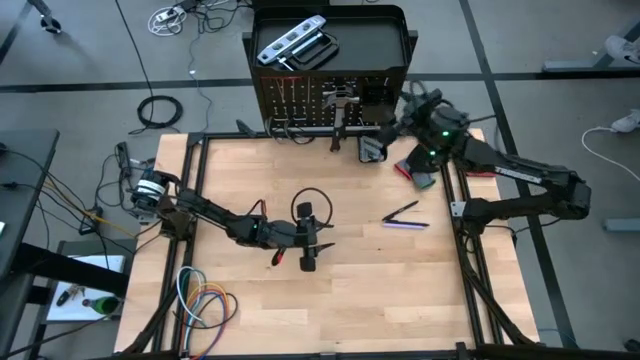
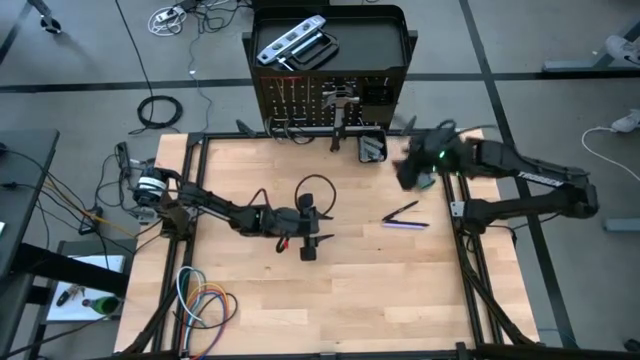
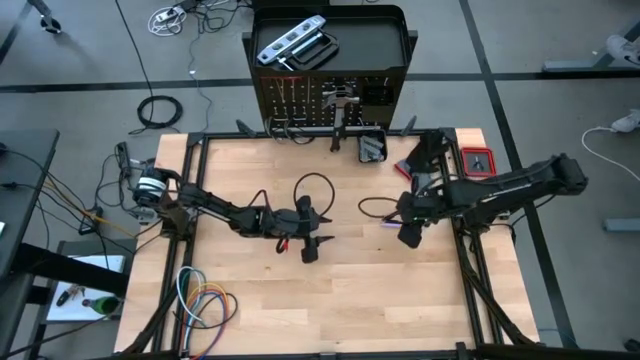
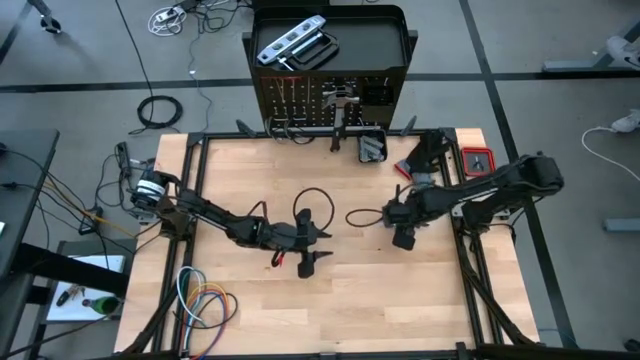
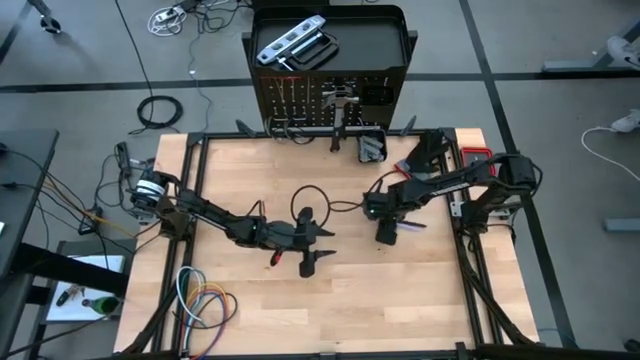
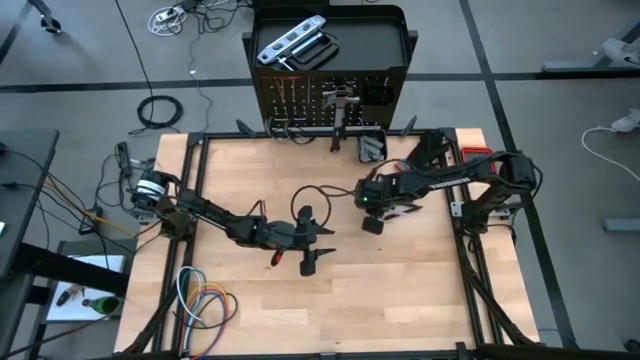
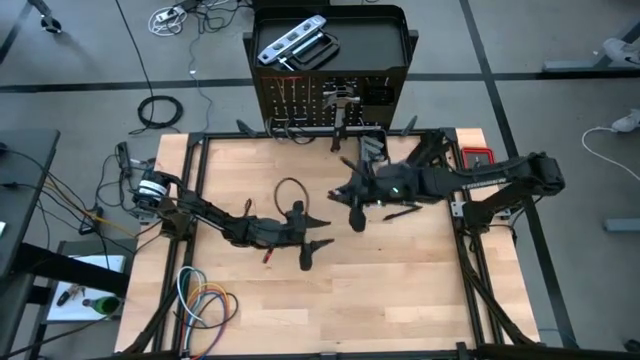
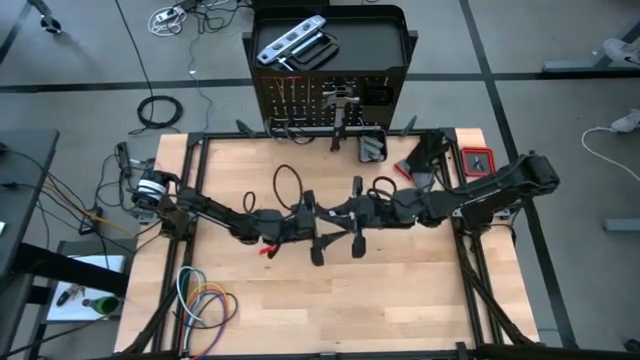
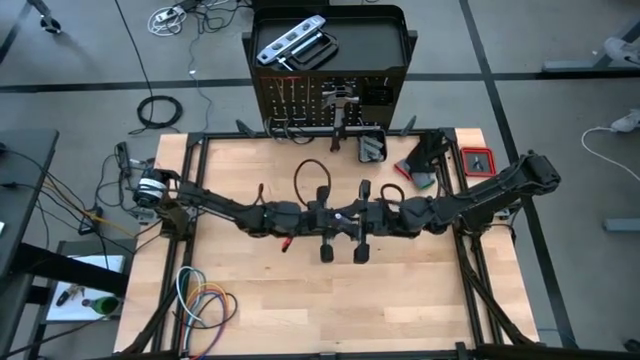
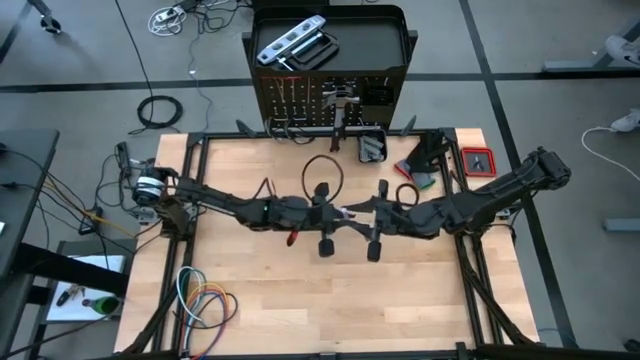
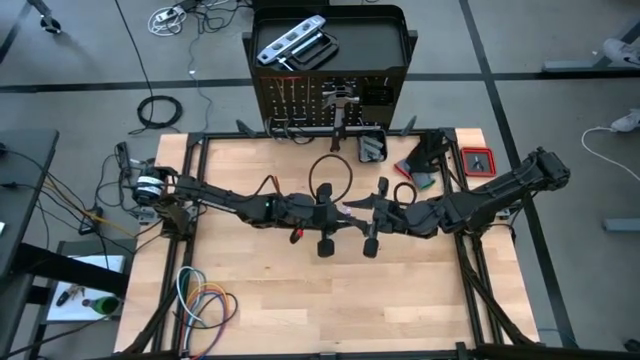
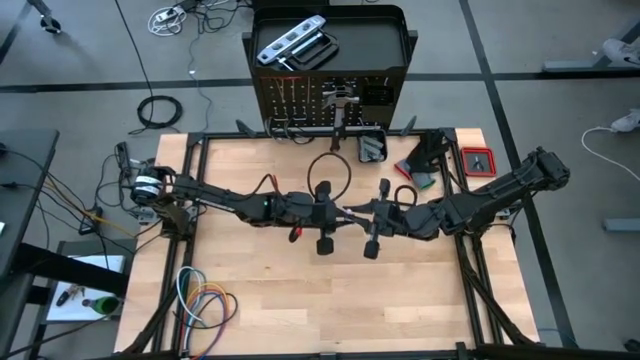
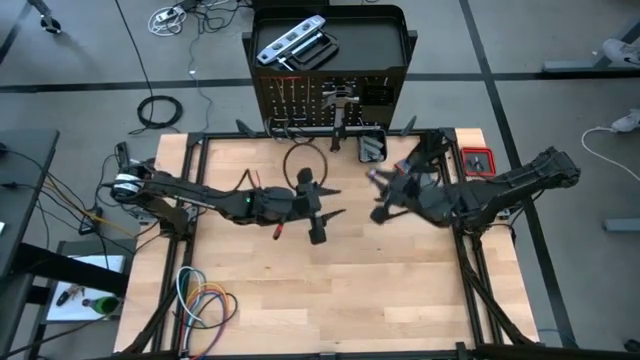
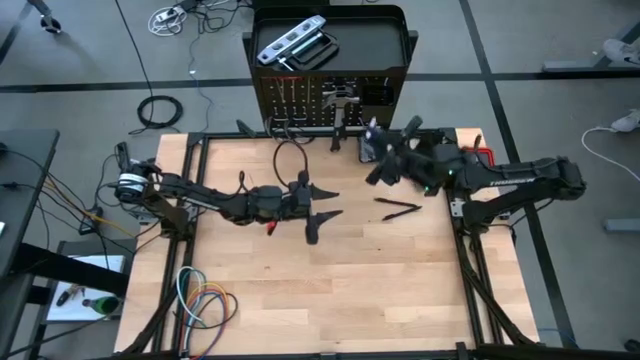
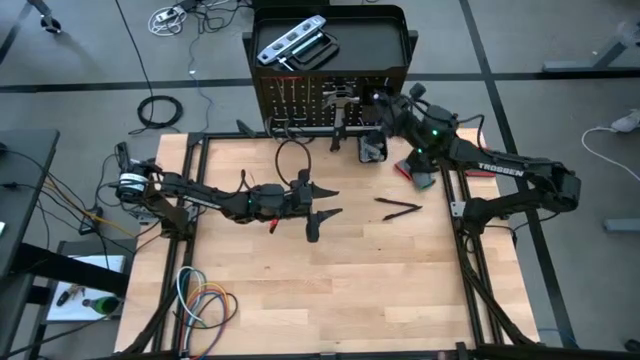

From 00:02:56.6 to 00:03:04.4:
Task: Hang tools onto peg board
Put the purple pen into the top basket of the peg board

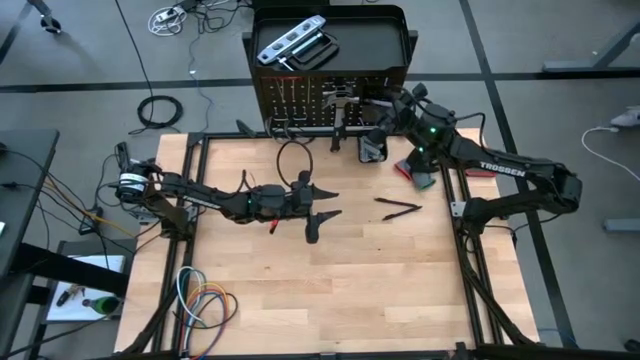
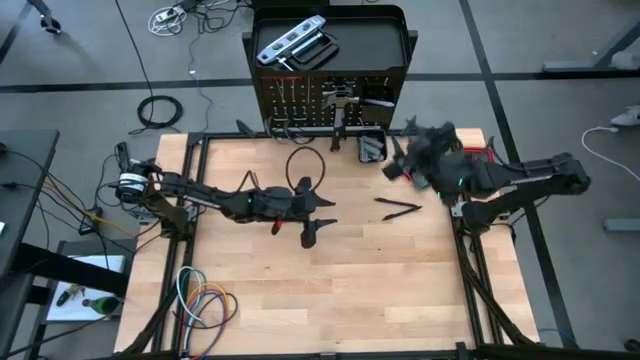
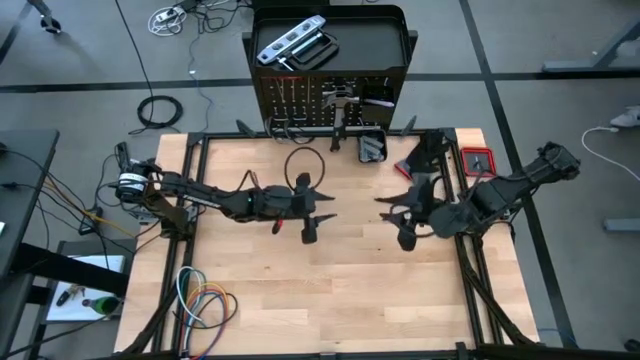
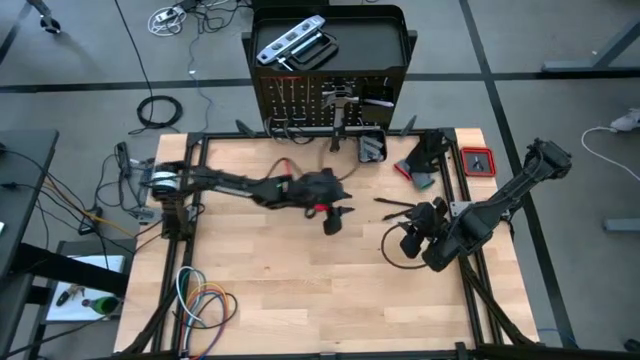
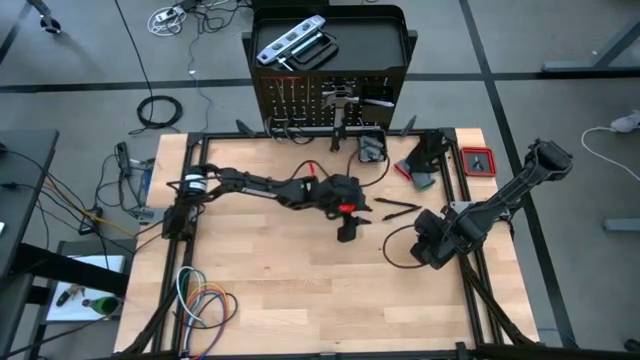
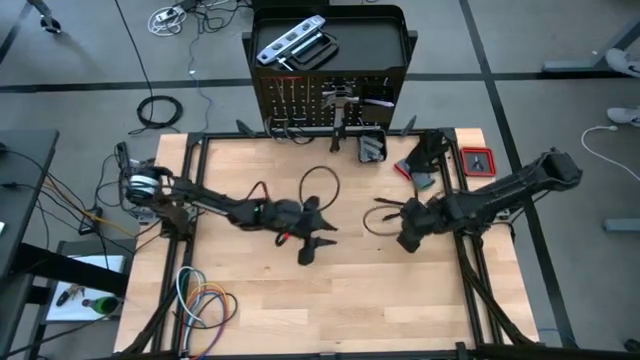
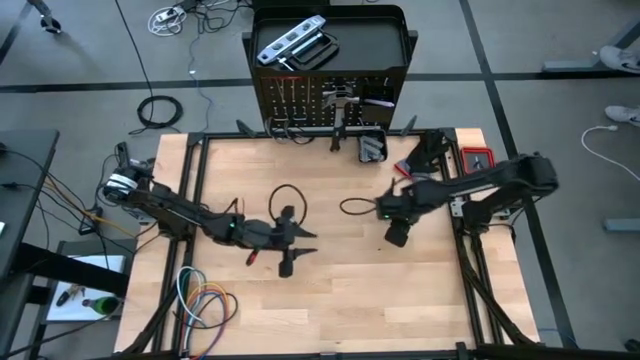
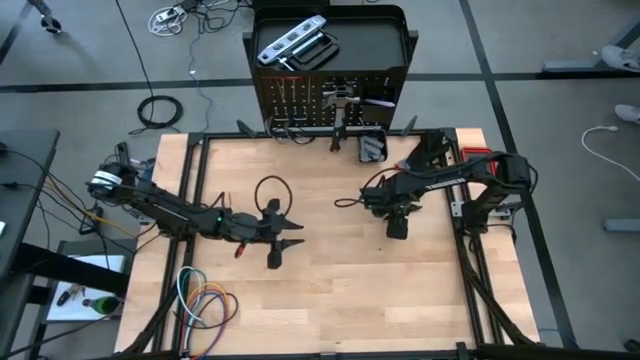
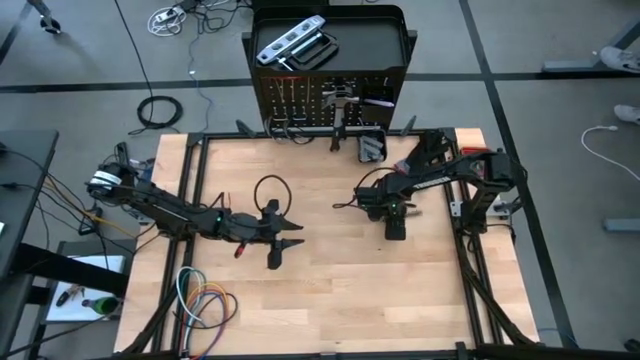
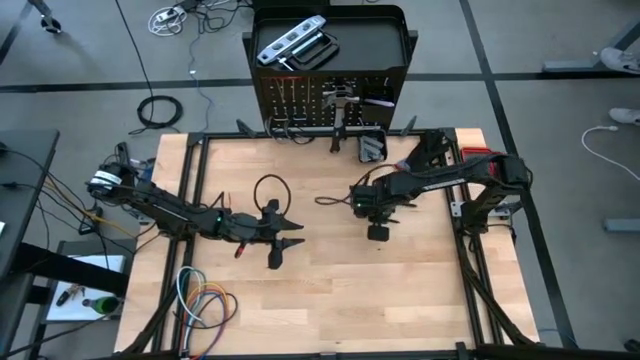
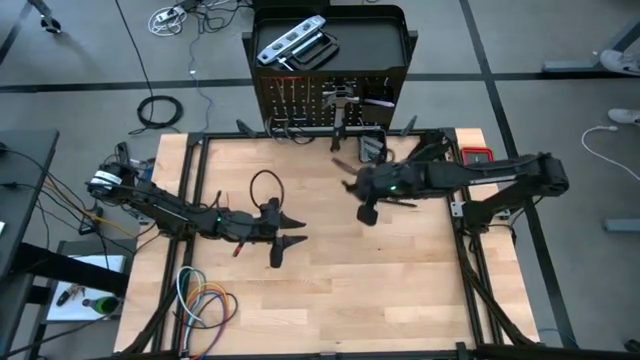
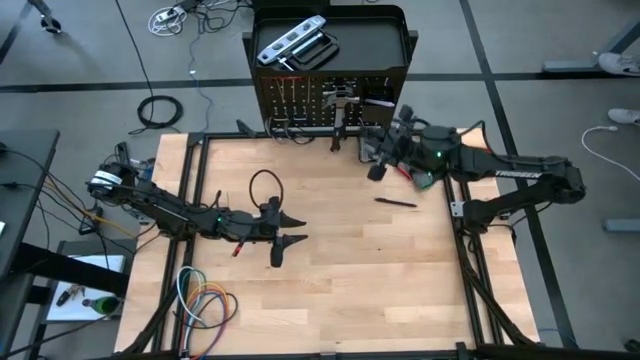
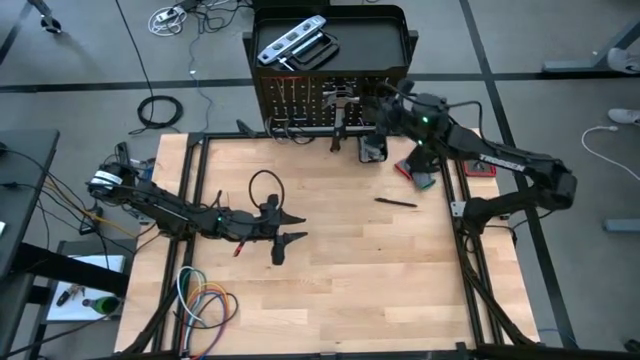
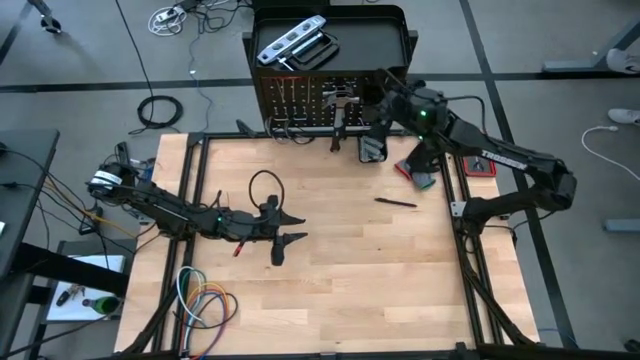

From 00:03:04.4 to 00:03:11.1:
Put the bottom black pen into the top basket of the peg board

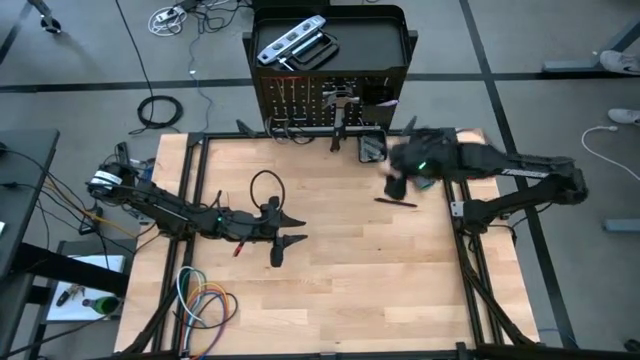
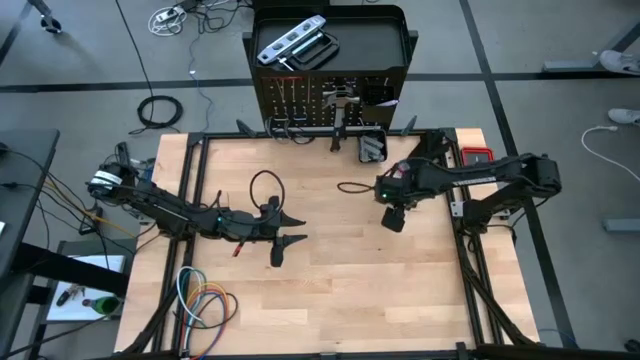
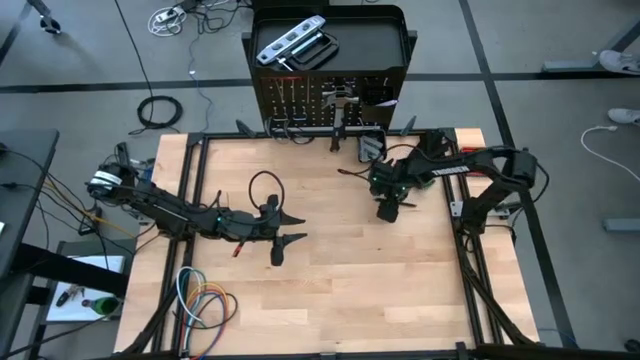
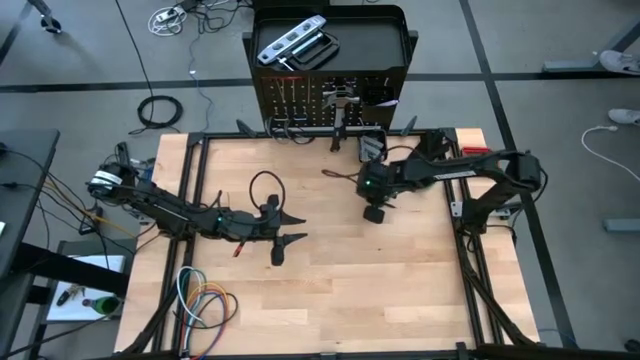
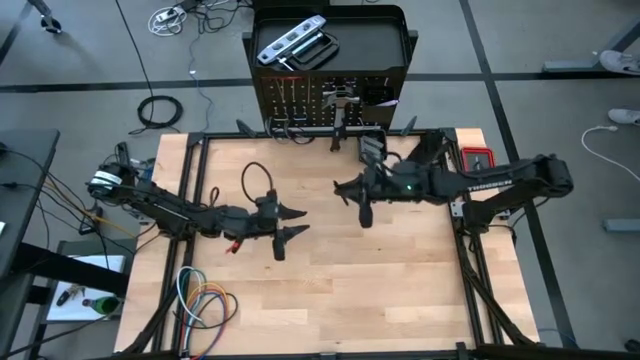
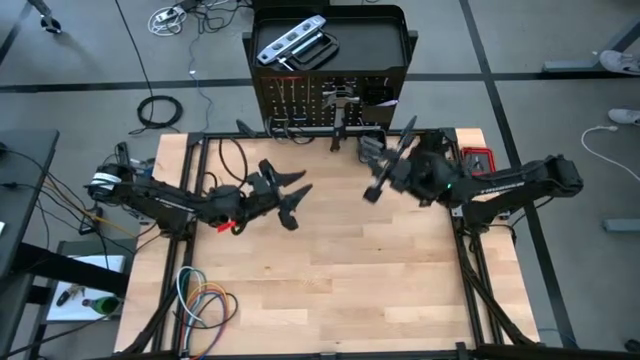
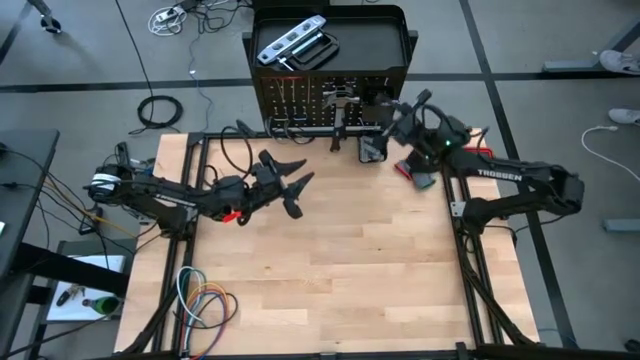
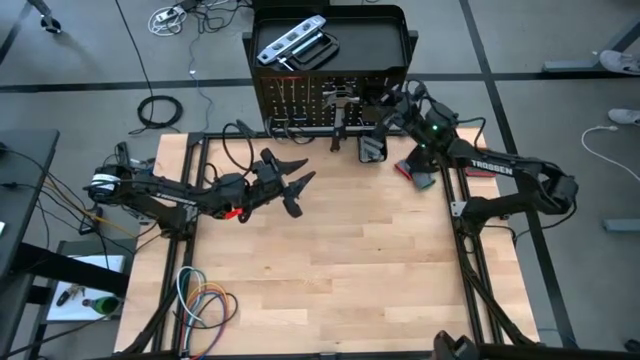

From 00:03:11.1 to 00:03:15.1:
Put the black pen into the top basket of the peg board

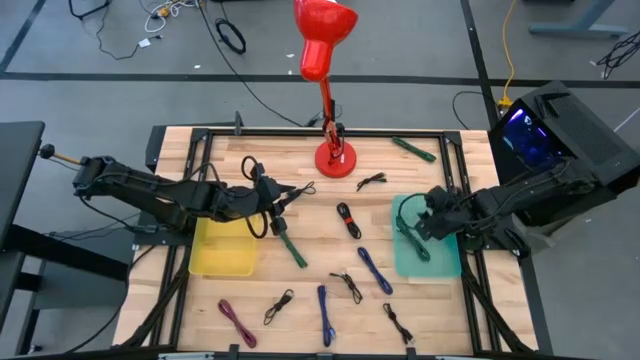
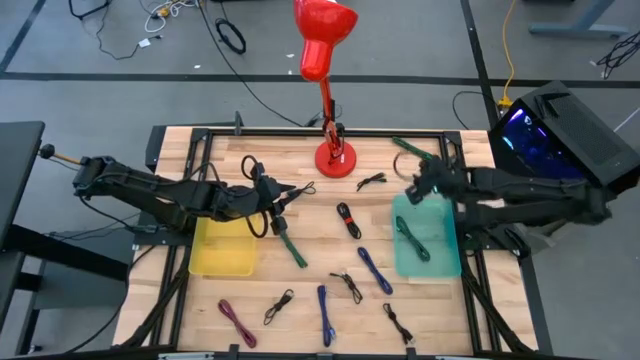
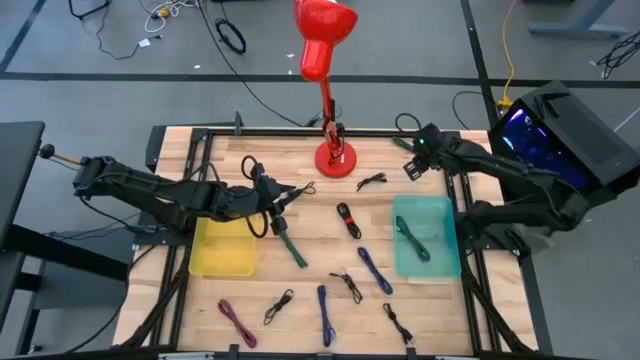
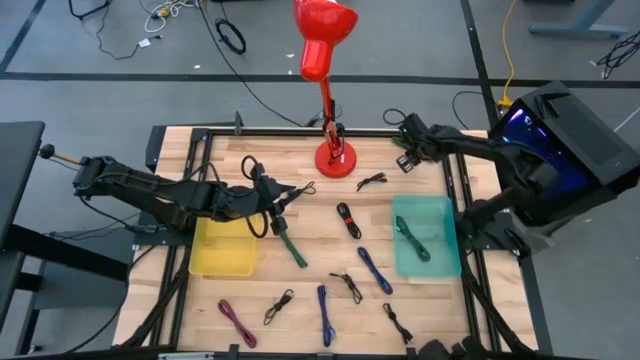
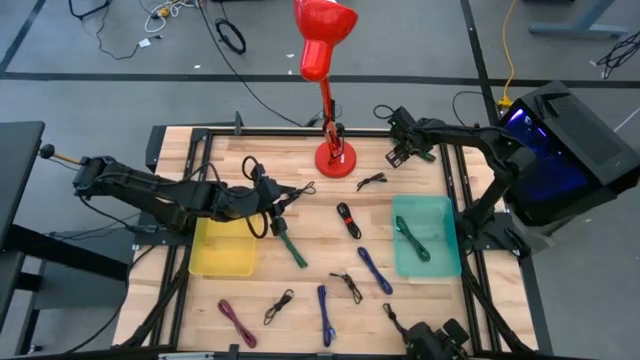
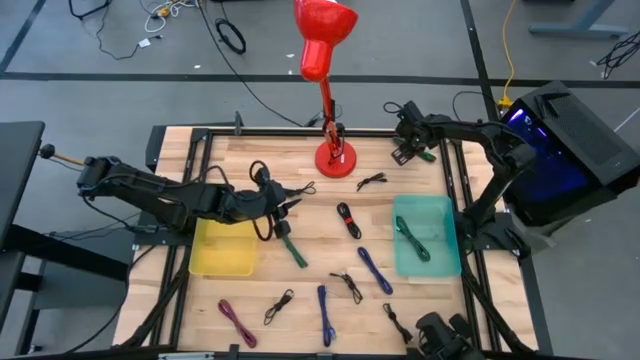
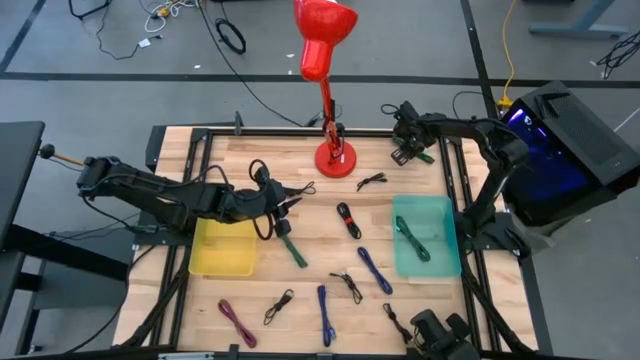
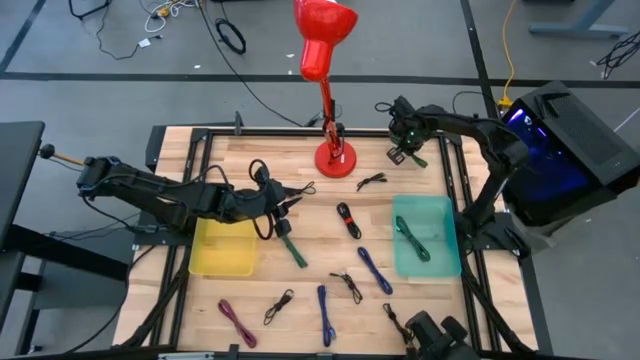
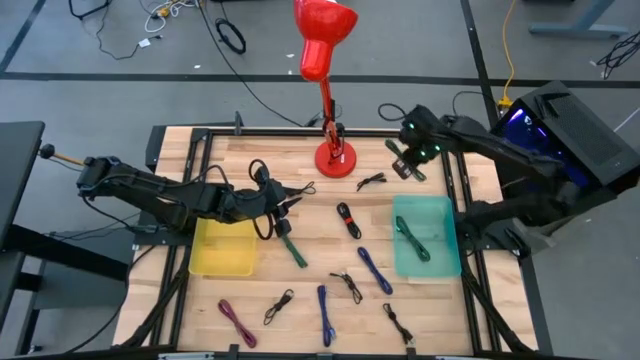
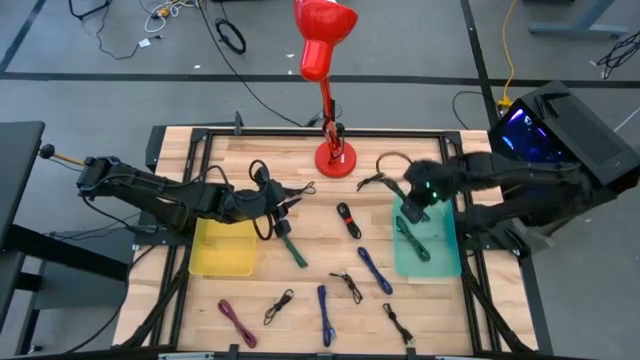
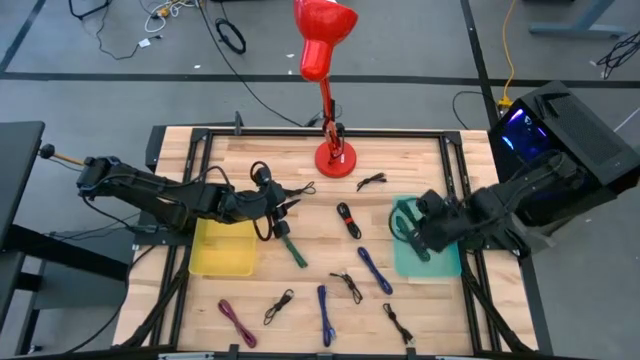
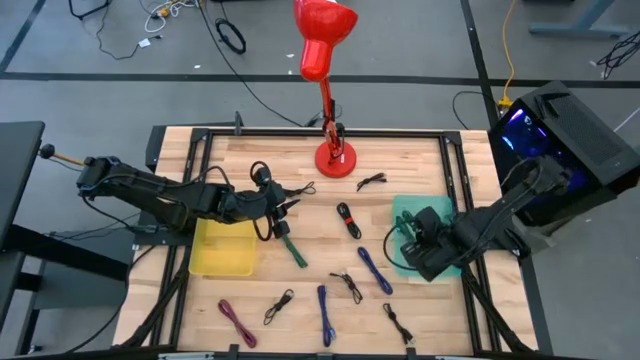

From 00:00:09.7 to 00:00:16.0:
Task: Pick & Place USB Port
Put the top green USB cable into the blue transparent bin
